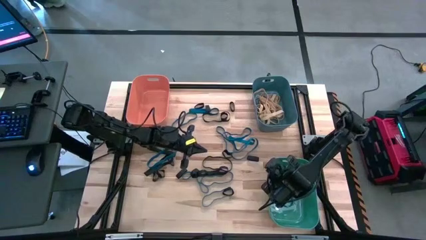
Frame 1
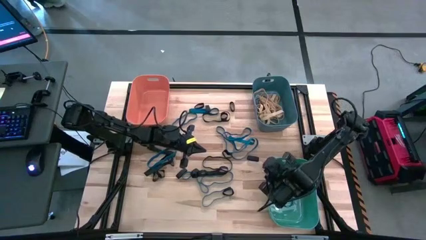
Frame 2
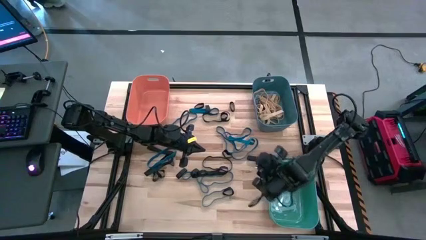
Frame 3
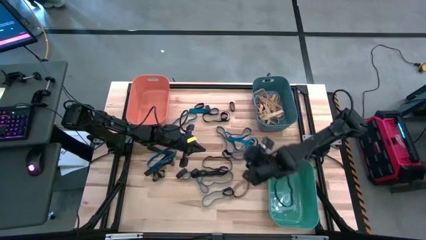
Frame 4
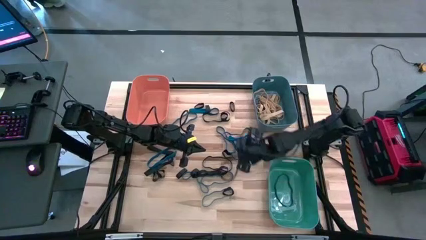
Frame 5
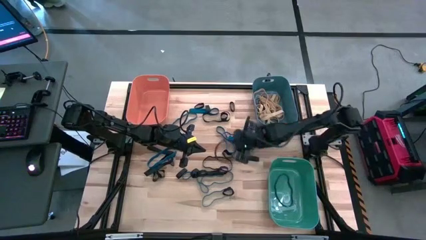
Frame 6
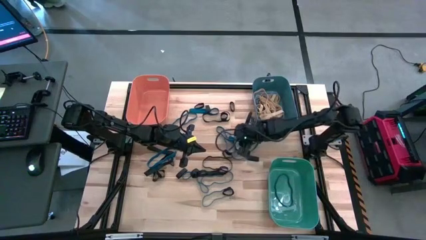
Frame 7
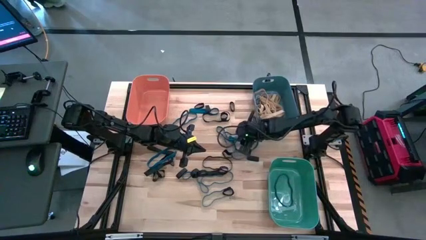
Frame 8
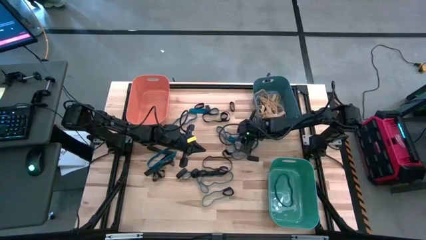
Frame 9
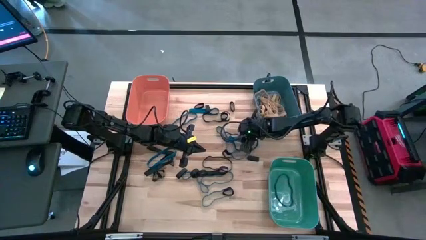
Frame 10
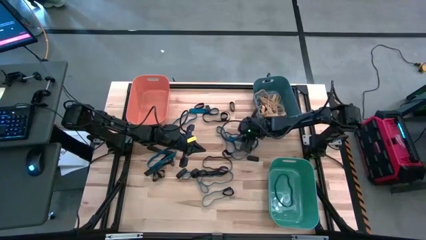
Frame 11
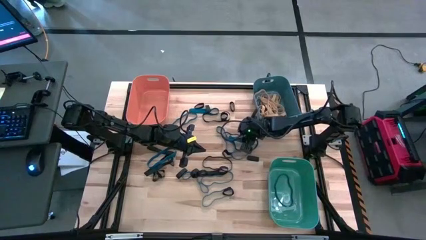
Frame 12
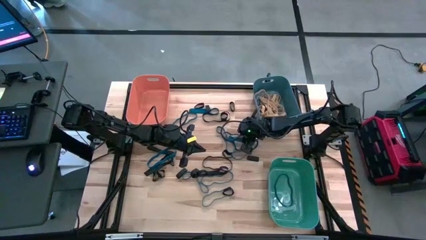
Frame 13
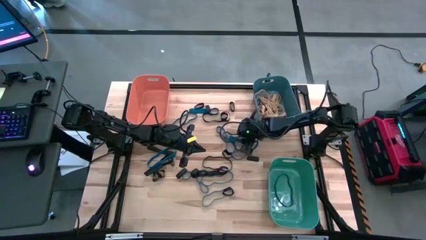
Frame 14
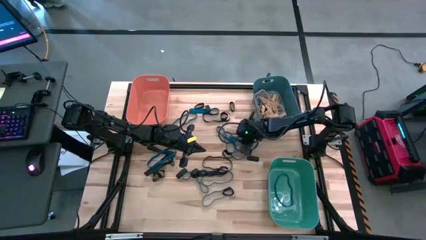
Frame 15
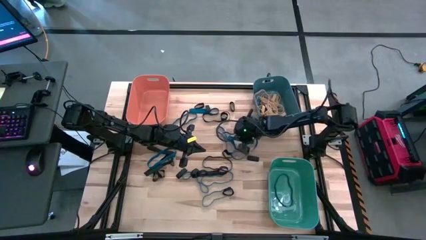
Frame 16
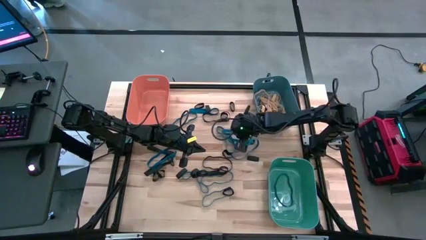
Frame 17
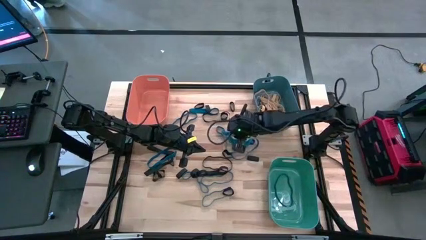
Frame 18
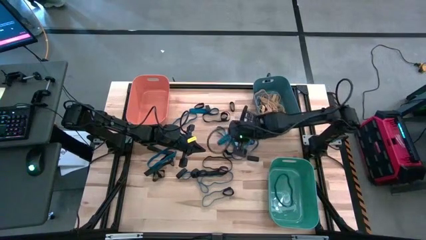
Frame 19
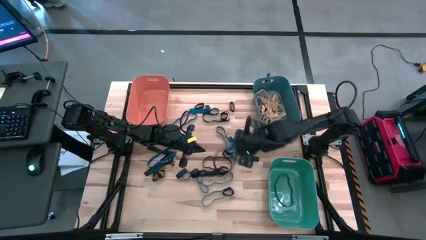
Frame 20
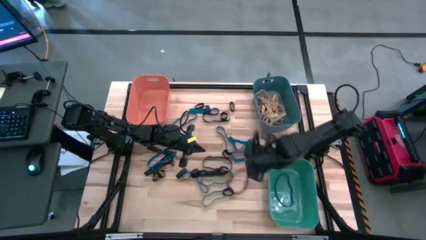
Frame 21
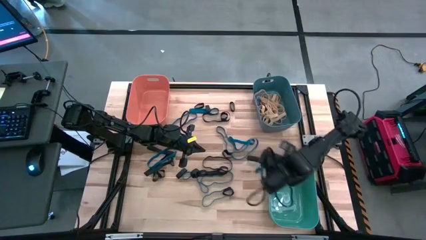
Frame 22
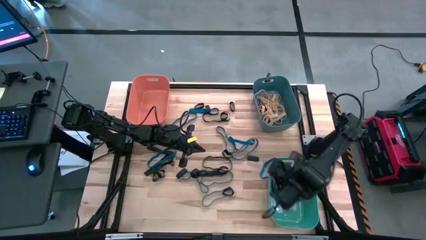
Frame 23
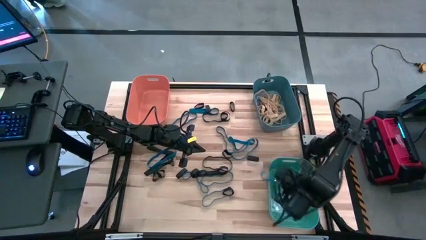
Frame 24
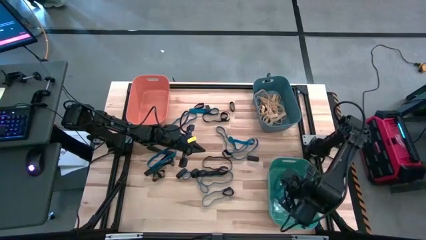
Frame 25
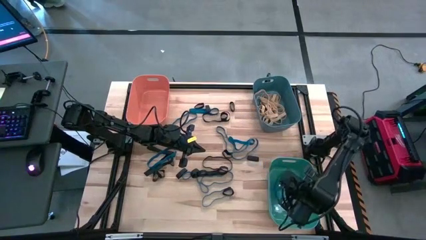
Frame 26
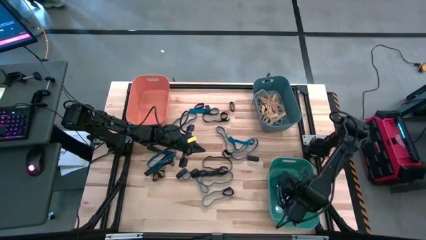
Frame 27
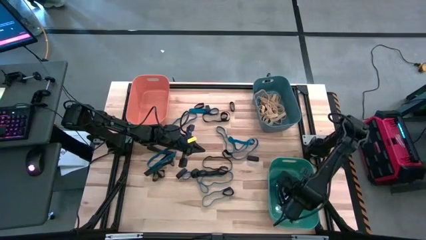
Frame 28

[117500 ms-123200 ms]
Task: Sort rubber bands into baskets
Put the blue rubber band into the green bin

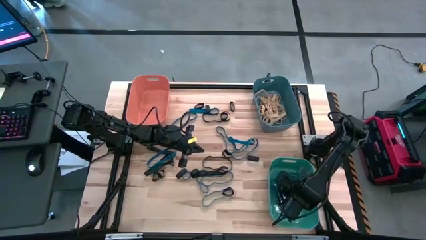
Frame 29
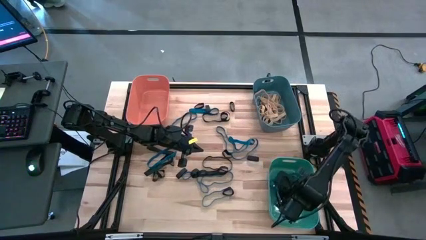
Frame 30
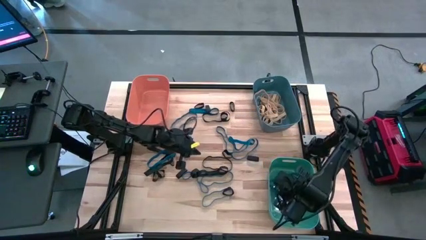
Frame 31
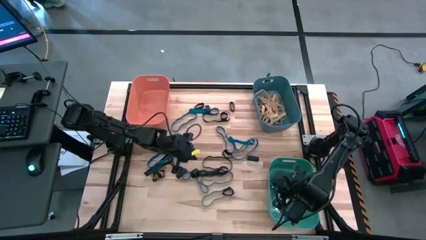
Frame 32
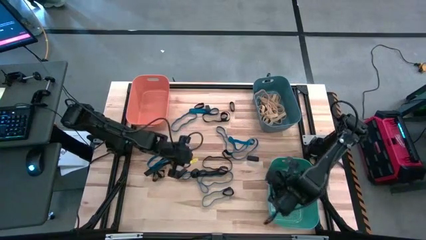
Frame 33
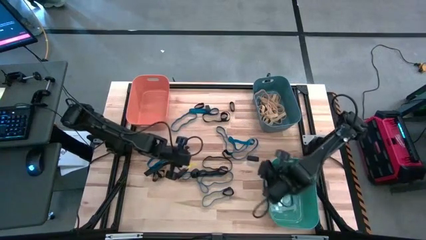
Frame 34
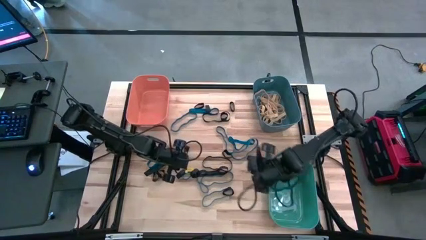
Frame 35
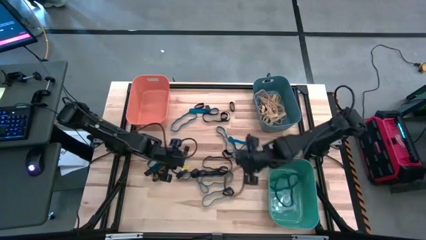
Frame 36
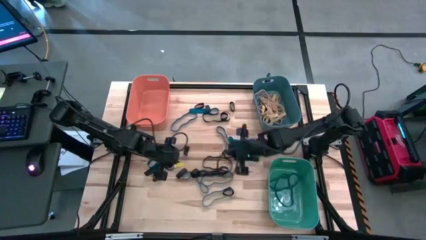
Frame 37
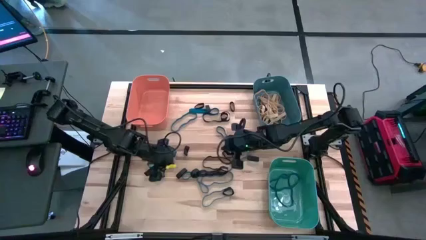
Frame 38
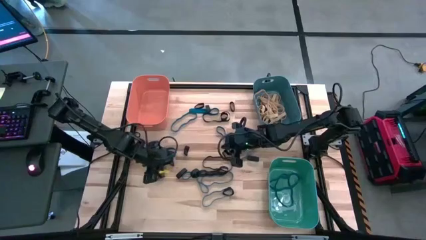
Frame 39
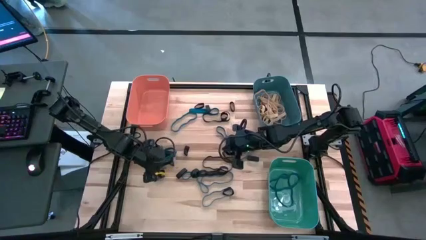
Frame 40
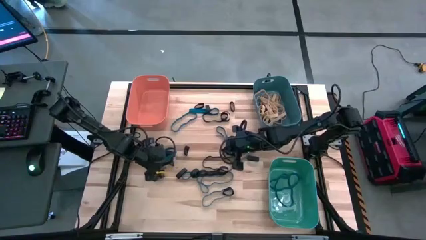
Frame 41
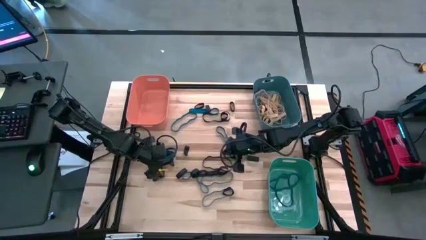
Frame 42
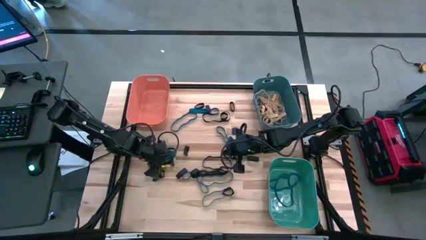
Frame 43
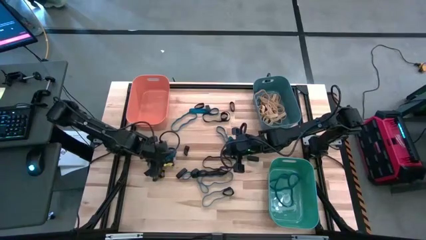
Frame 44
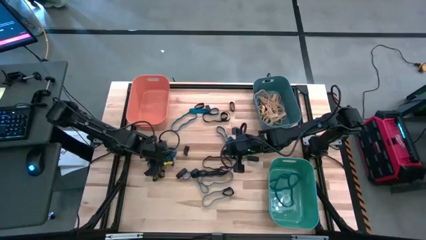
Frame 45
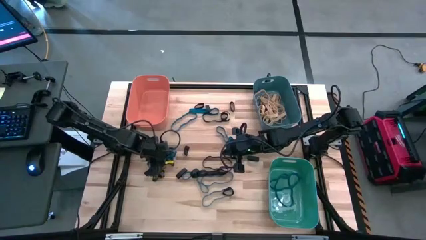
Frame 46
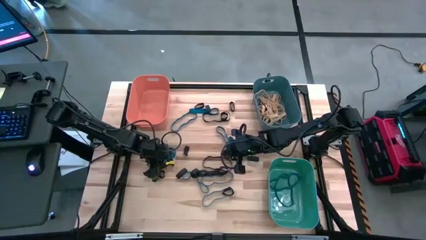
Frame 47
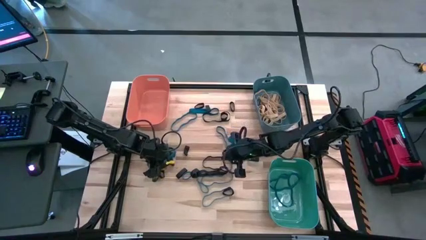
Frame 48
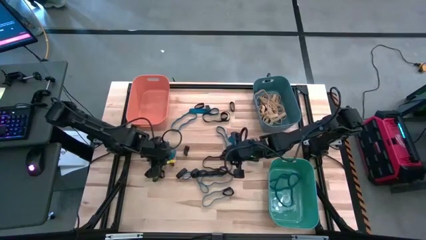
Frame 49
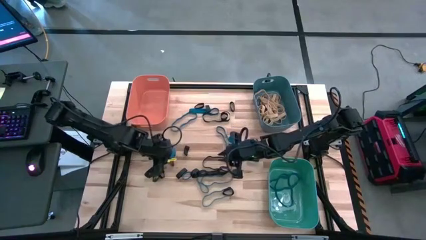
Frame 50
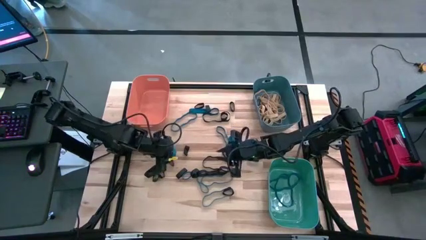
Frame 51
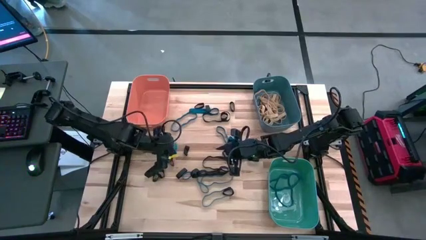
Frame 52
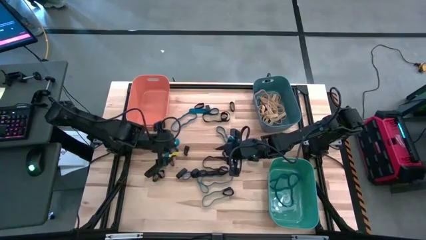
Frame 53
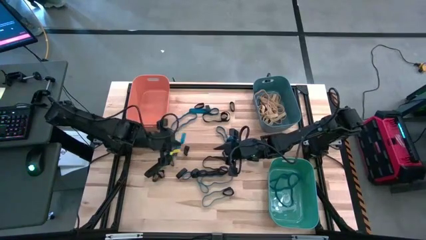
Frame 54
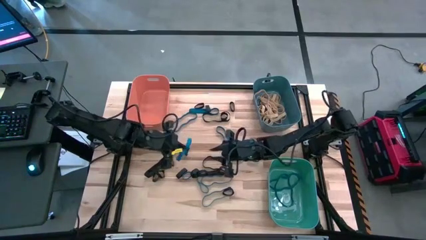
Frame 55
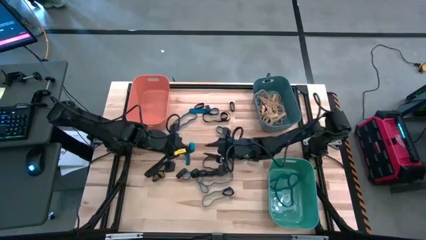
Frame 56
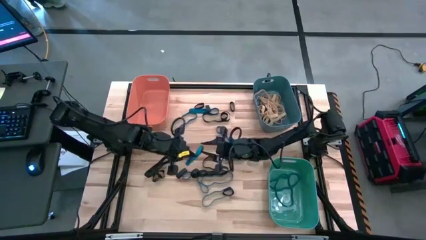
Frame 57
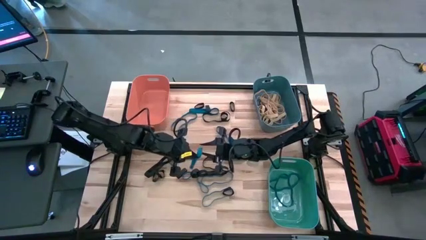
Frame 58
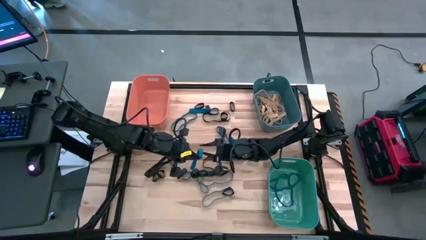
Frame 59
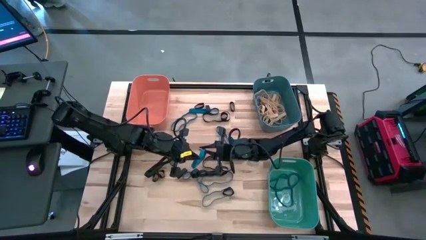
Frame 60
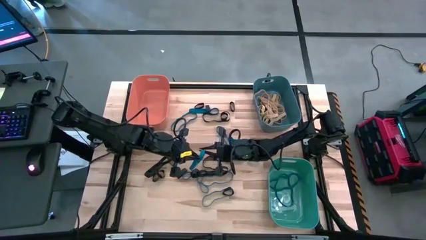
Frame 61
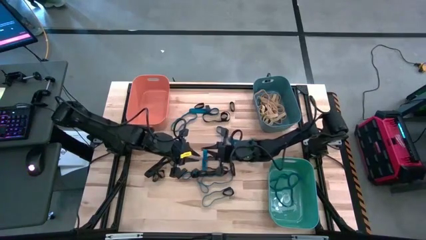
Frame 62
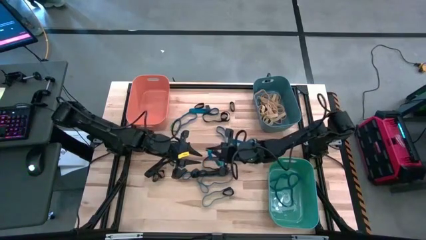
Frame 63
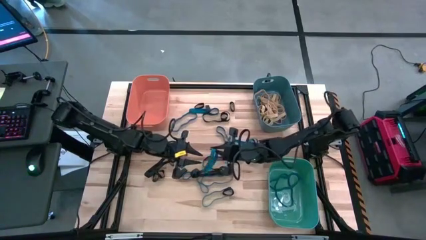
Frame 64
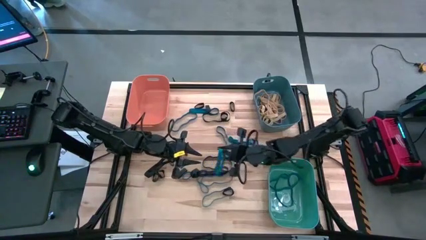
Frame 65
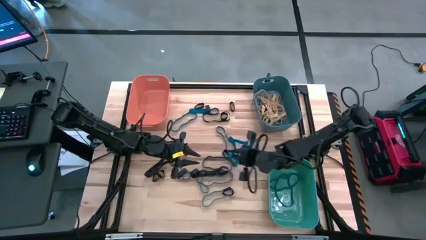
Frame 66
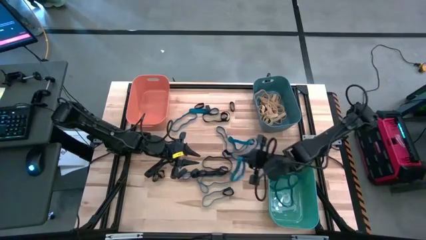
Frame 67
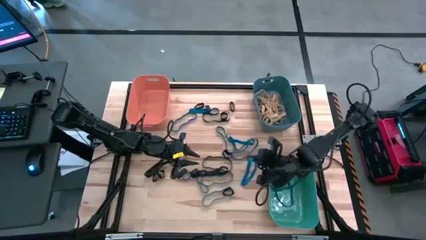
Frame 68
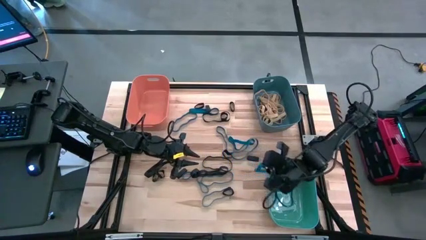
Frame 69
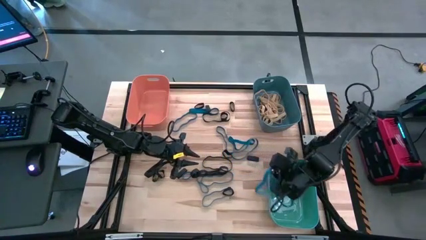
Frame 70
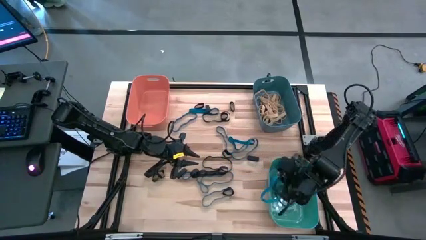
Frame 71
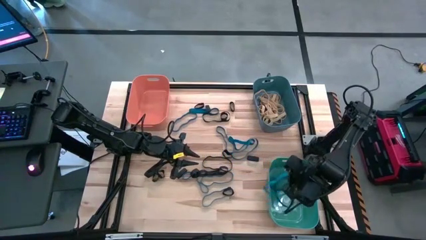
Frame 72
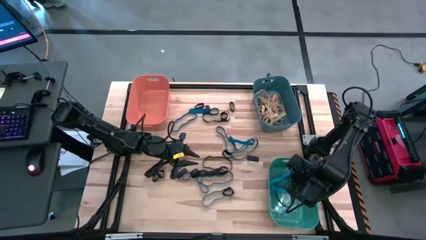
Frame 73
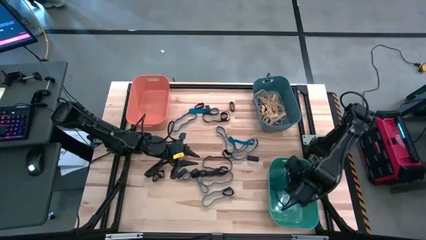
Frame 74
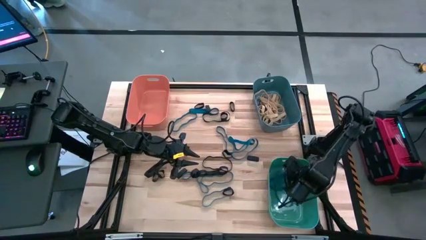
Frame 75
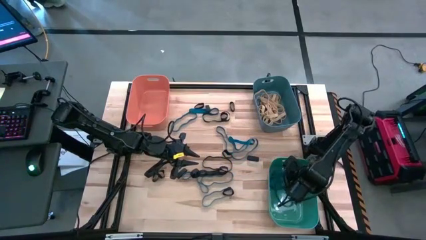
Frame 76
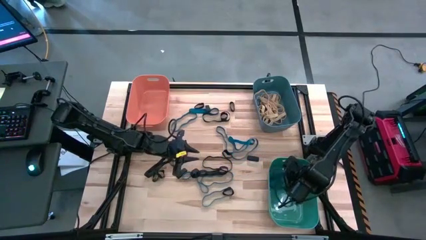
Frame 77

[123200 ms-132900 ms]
Put the blue rubber band into the green bin

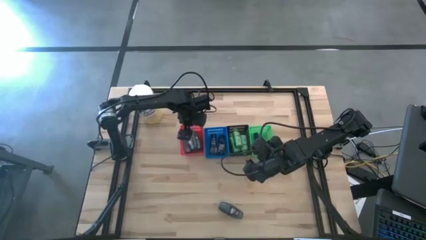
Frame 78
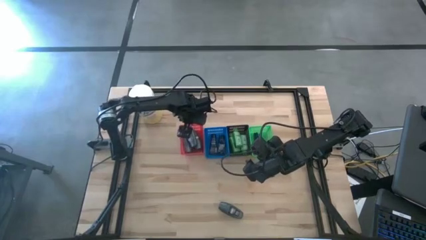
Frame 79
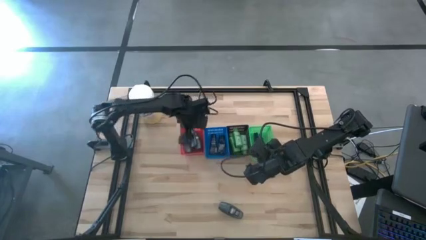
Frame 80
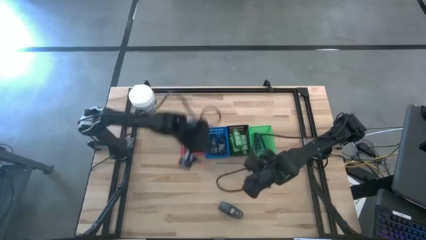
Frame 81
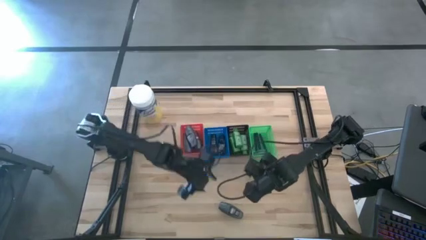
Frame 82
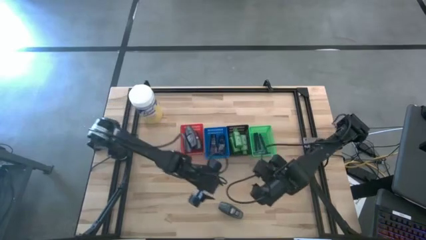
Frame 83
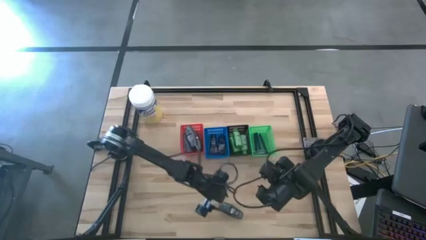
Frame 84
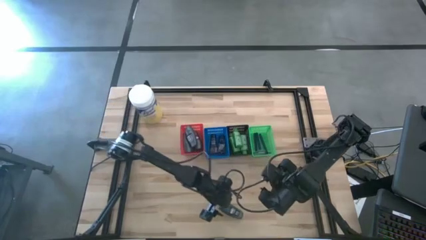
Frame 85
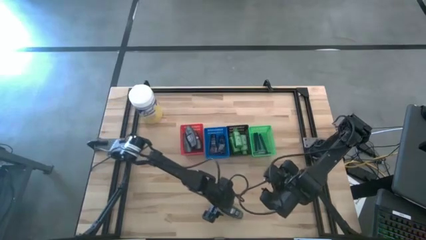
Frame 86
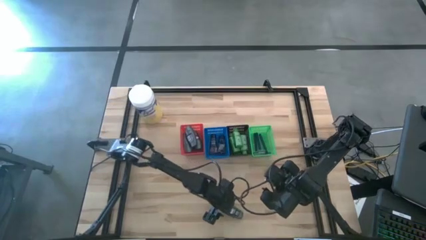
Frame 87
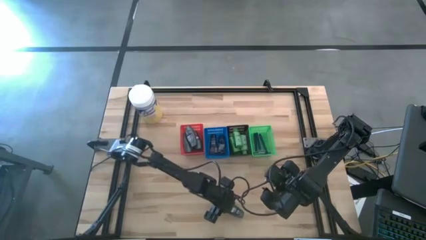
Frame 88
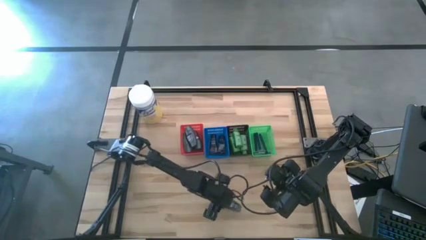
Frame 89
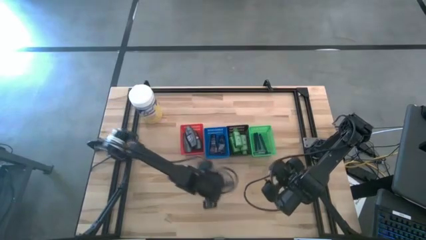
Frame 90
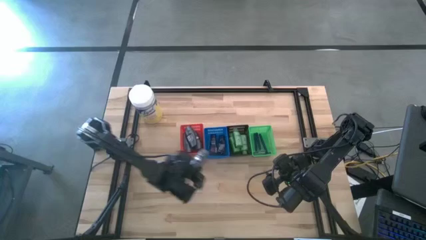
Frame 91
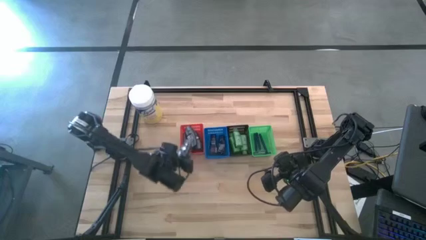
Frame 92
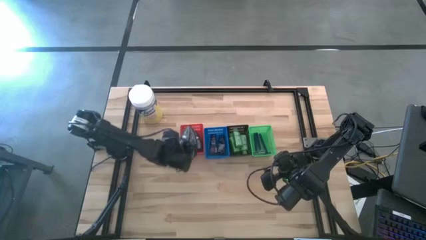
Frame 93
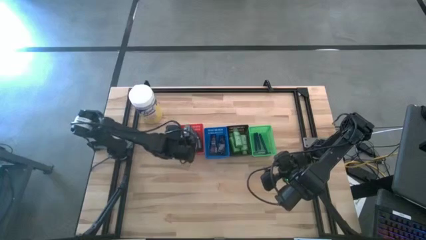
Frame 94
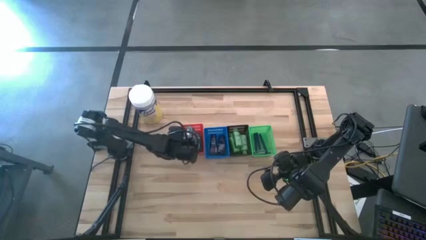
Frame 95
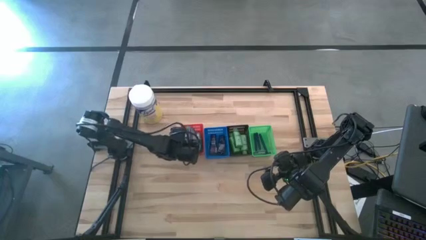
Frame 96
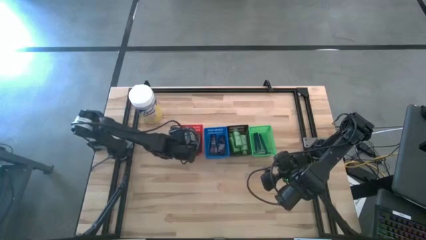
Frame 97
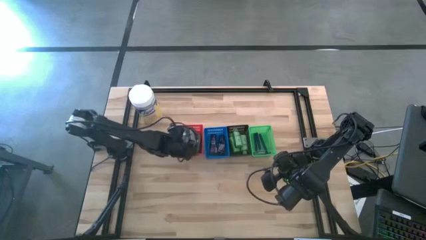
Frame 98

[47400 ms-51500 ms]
Task: Pick & Place Travel size toiletries
Put the black deodorant into the red bin
